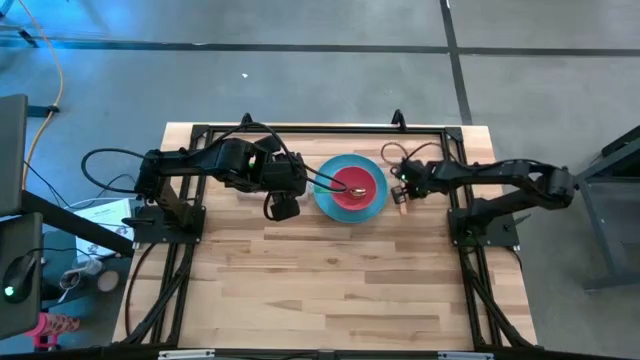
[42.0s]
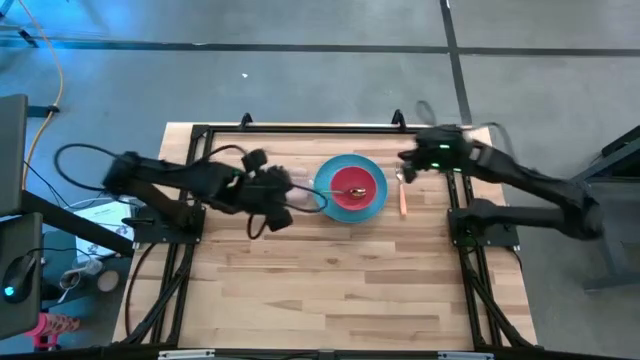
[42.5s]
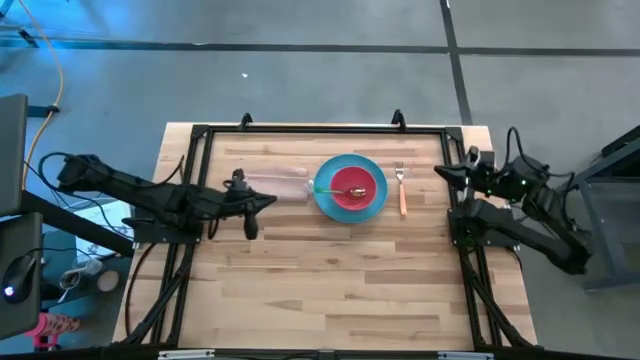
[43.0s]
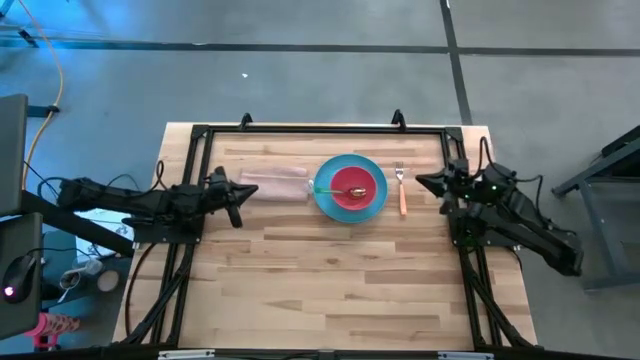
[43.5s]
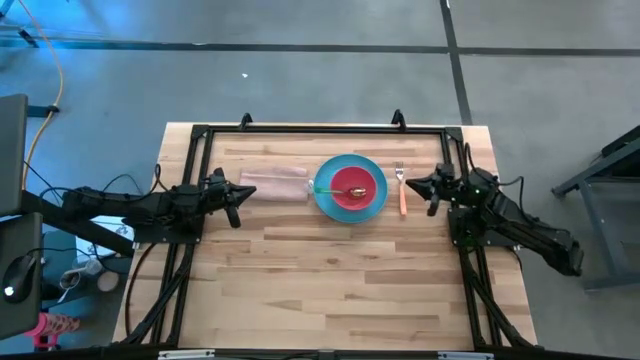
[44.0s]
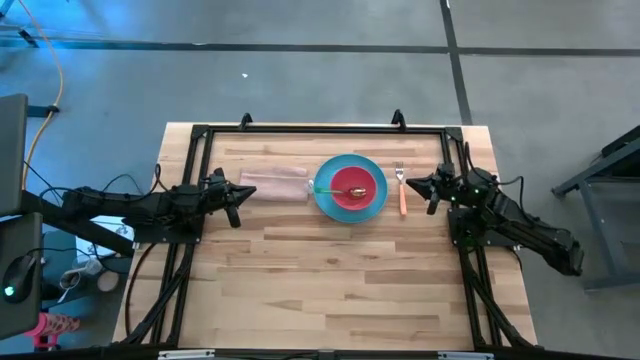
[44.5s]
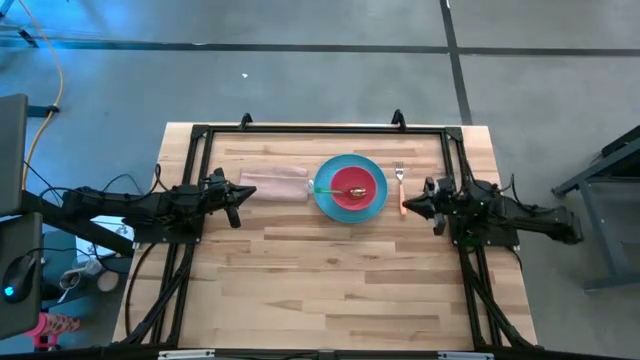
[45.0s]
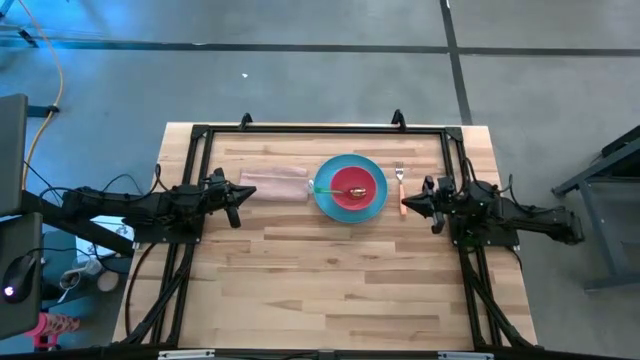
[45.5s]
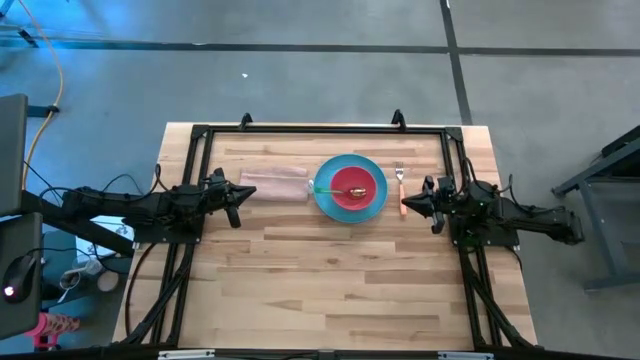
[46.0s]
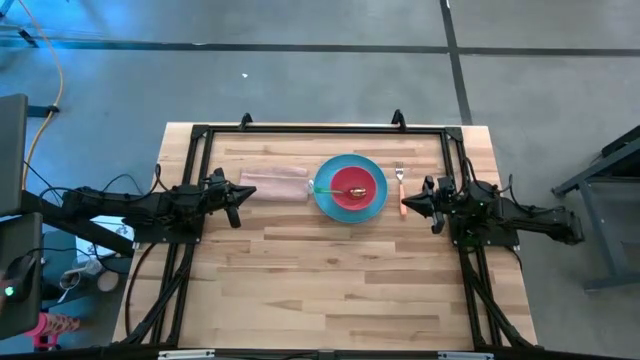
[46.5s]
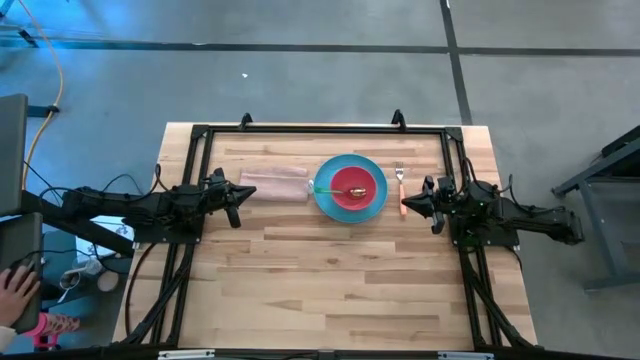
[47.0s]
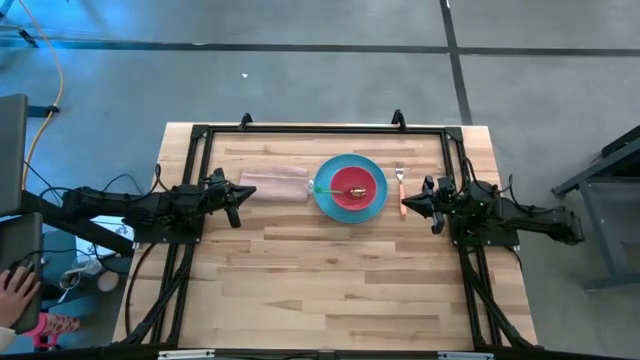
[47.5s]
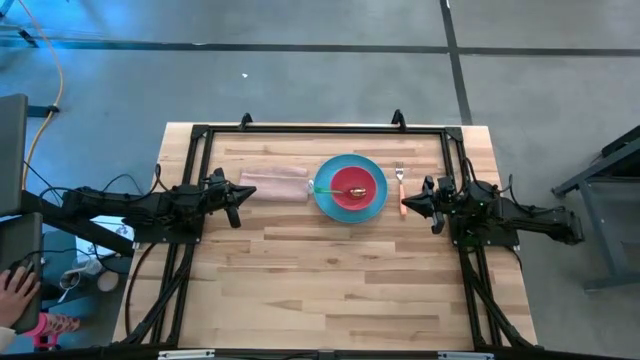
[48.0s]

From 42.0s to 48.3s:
Task: Set table place
Return to Home Position

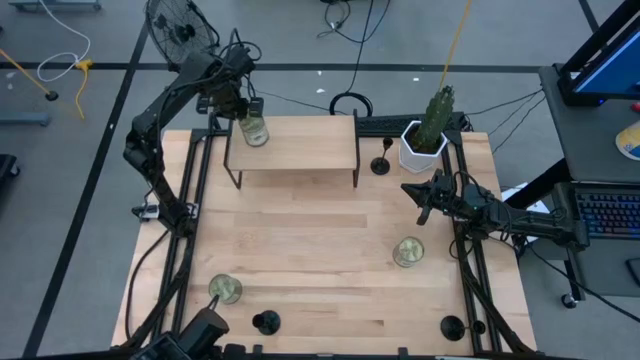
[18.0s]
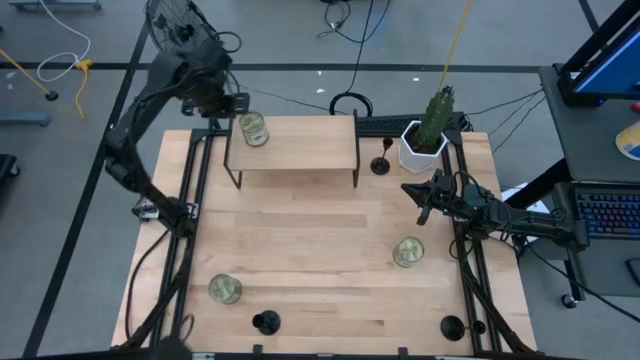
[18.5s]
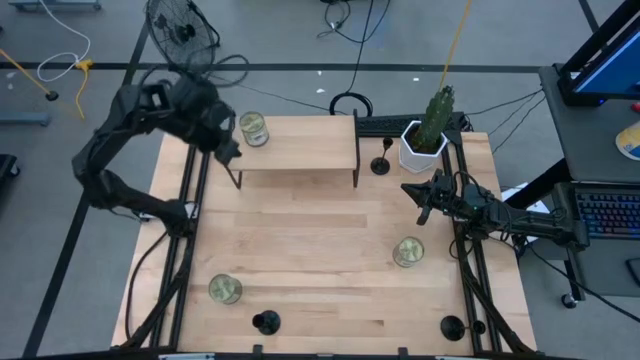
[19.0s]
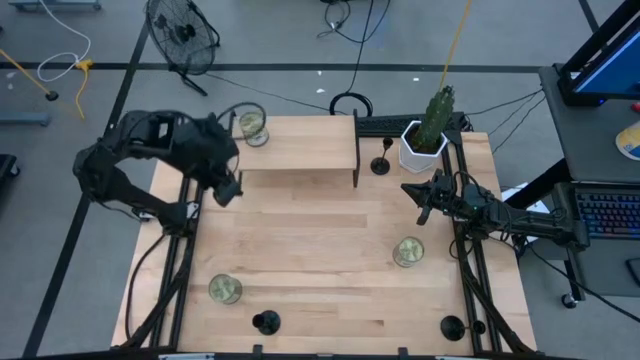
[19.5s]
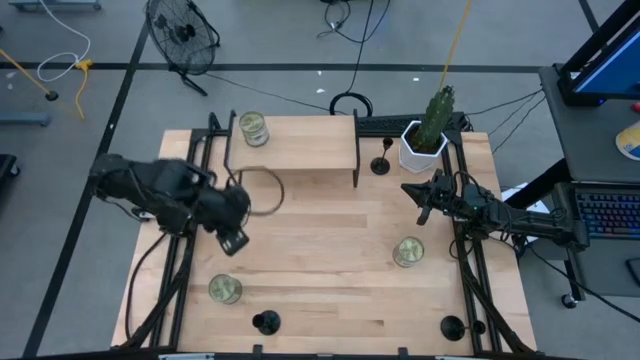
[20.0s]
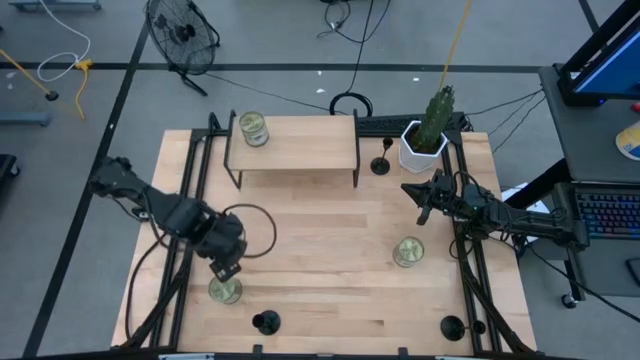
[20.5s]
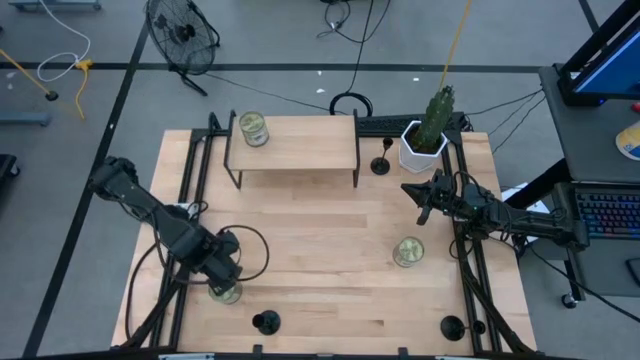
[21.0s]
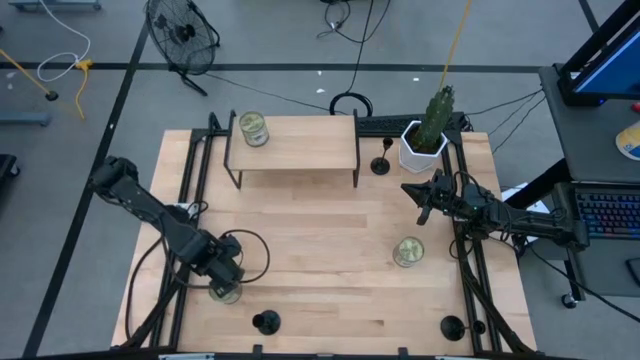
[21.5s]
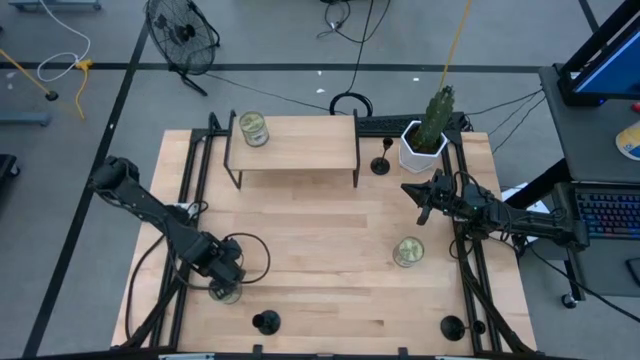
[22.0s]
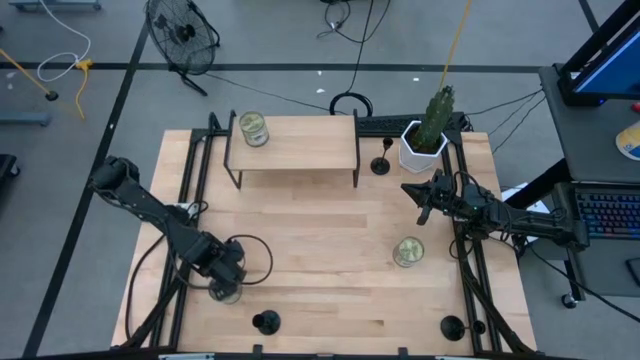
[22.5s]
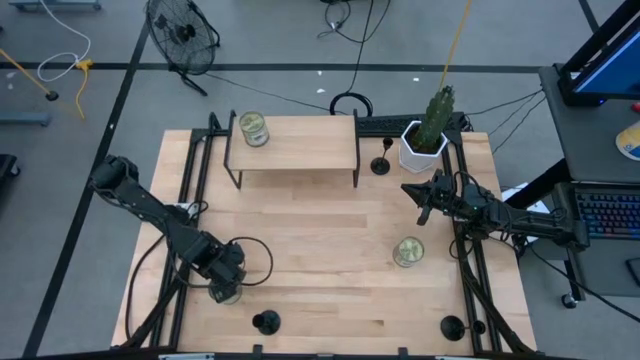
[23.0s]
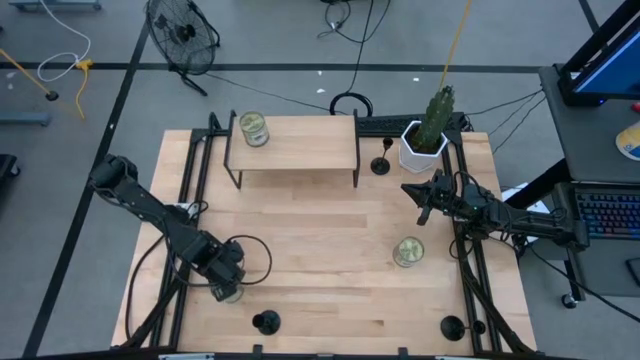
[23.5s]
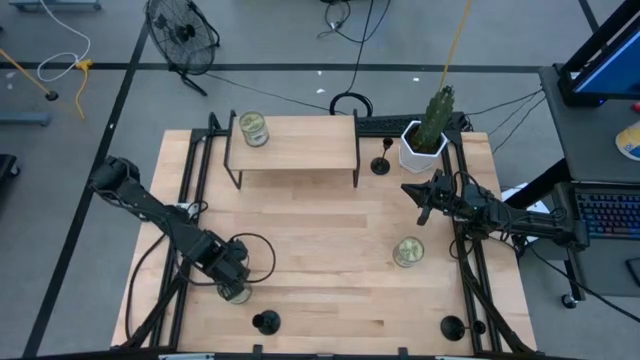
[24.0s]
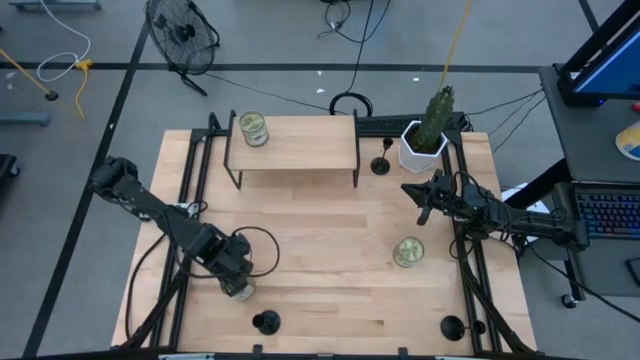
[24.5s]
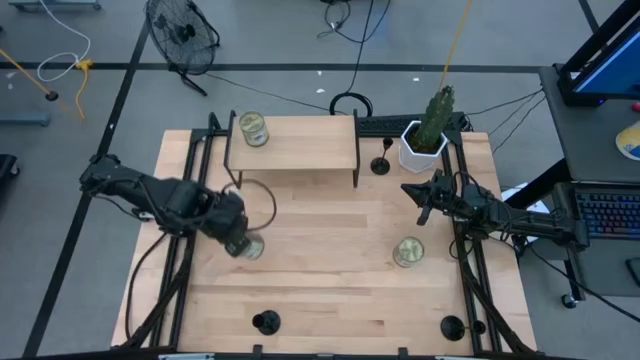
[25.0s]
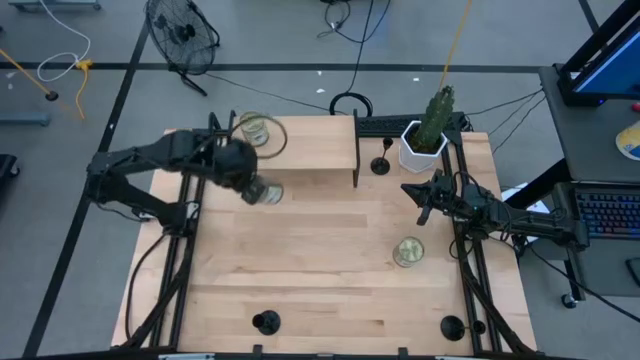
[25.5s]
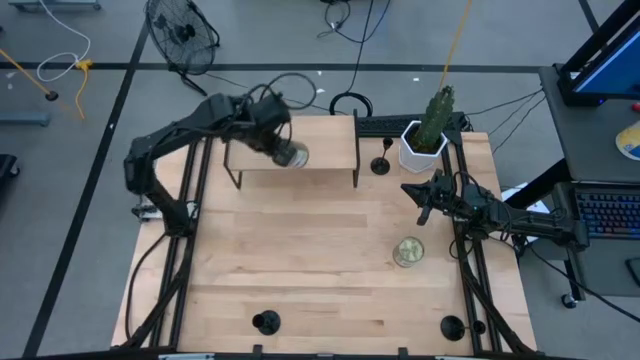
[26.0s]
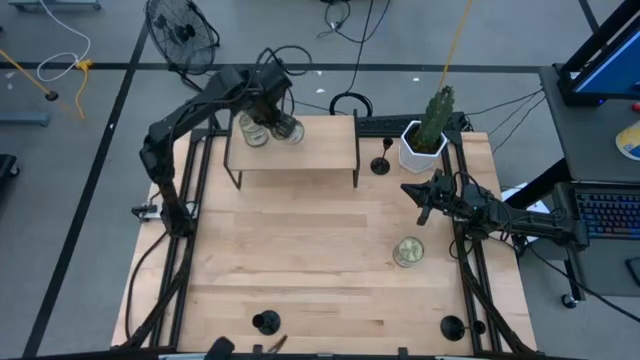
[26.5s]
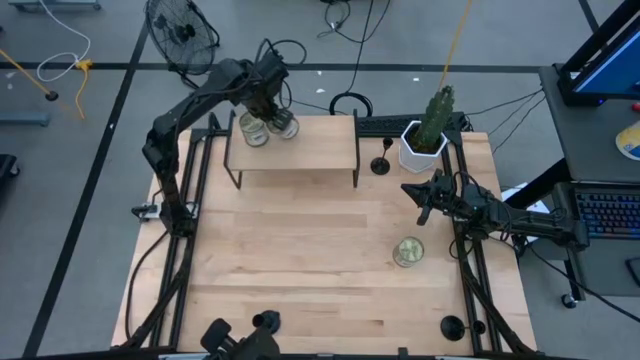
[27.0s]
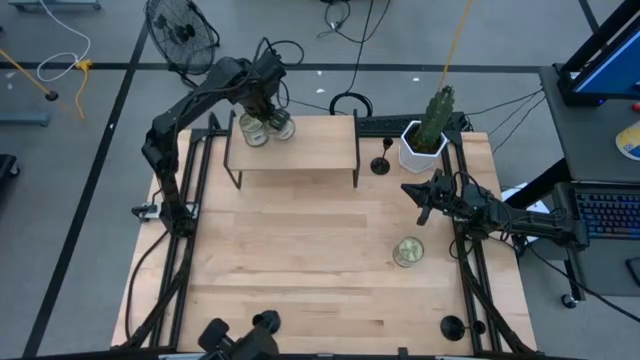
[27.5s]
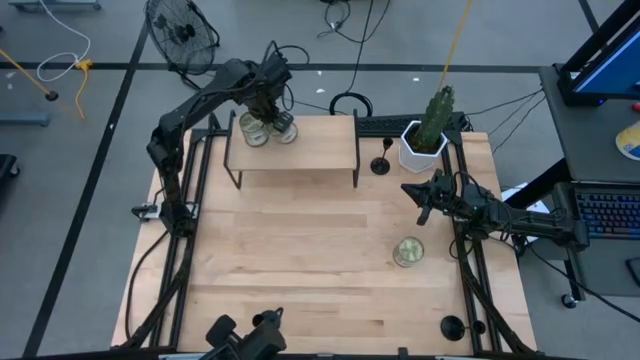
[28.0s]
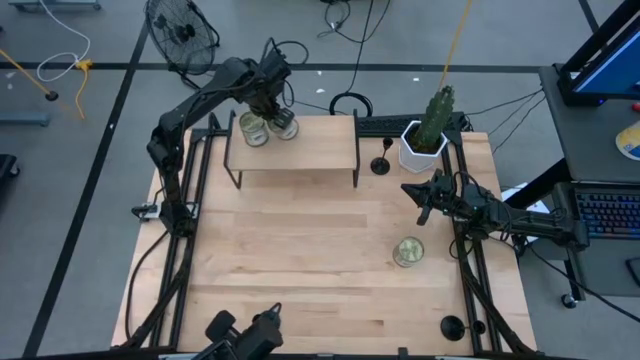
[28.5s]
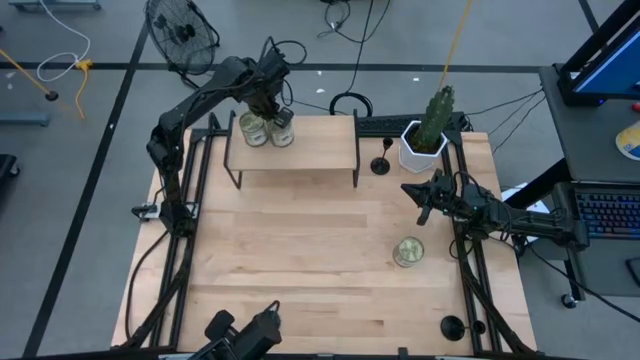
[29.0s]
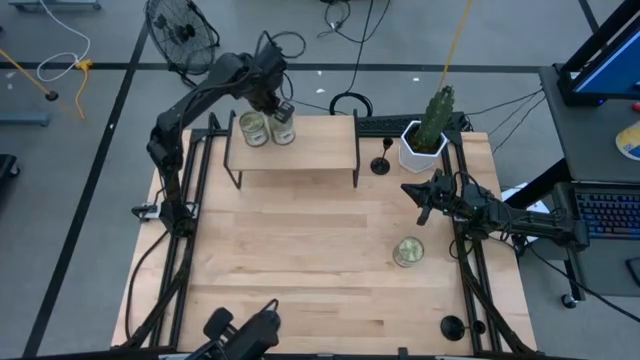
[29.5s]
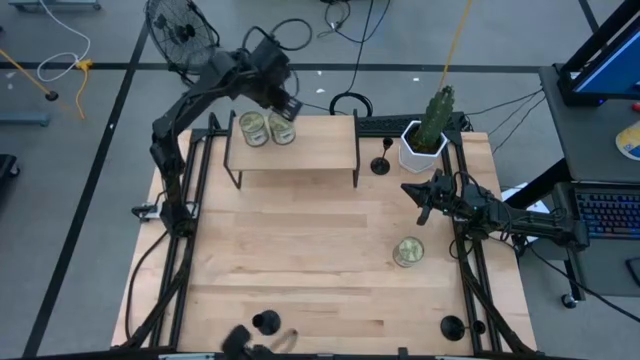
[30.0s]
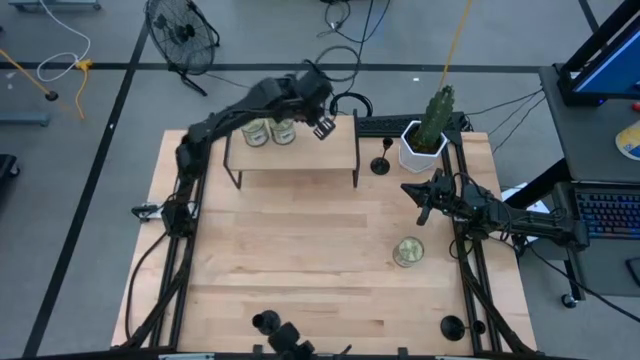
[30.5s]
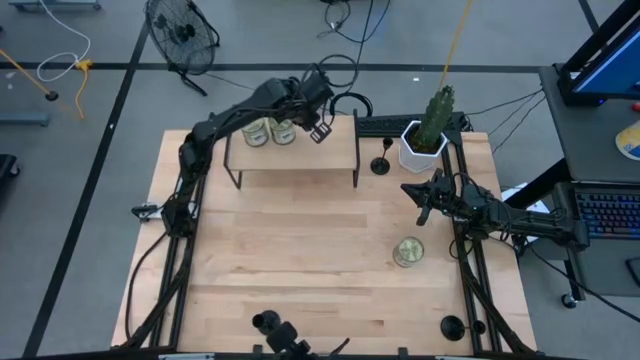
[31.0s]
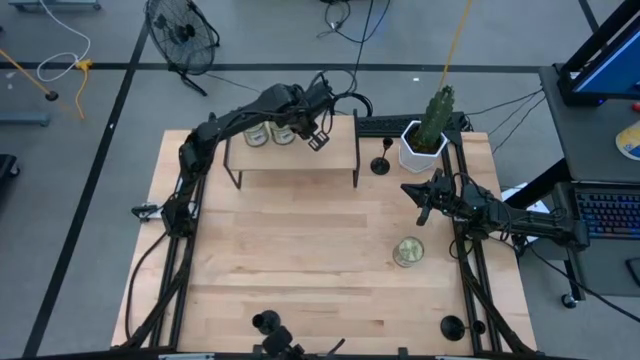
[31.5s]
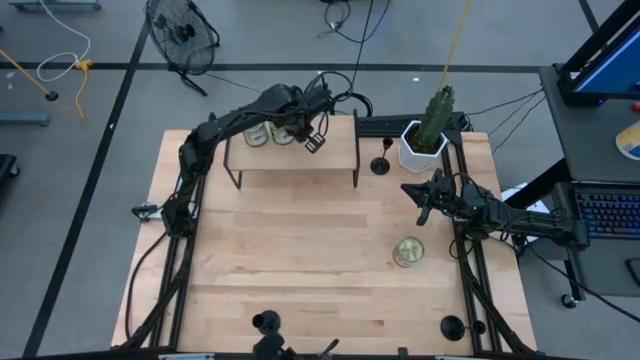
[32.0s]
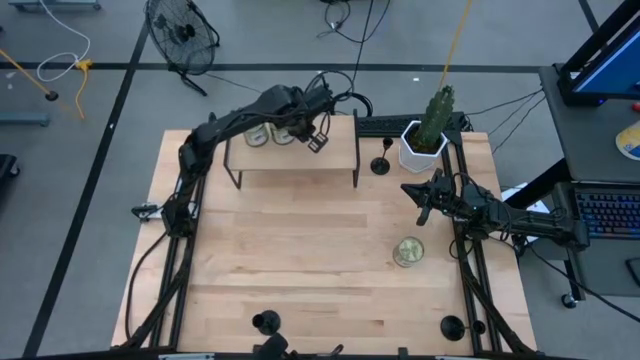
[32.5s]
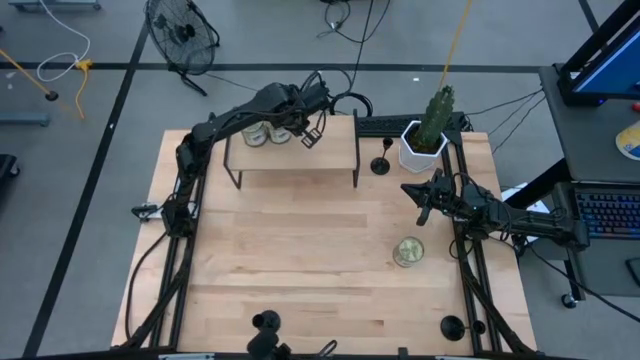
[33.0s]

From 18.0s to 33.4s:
Task: Pick & Place candle stick holders
Put the left green scented candle on the shelf
